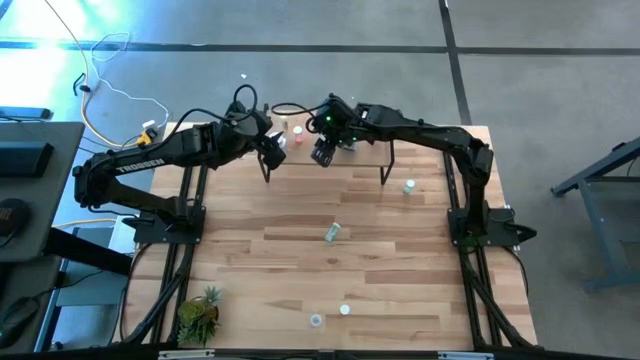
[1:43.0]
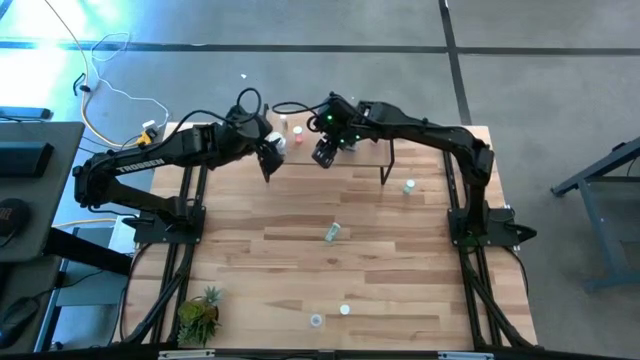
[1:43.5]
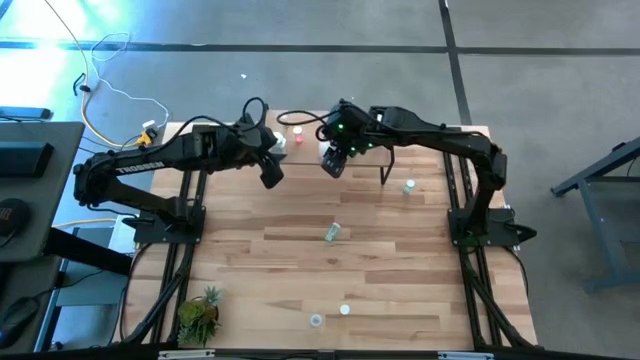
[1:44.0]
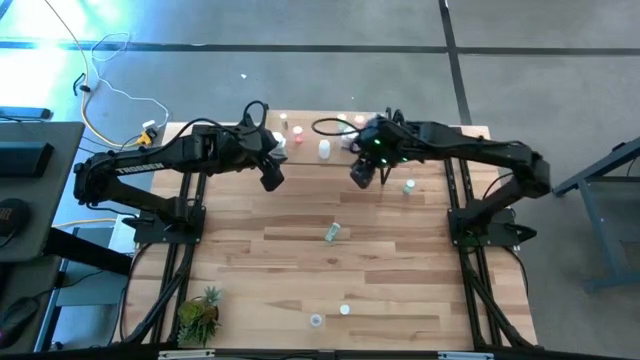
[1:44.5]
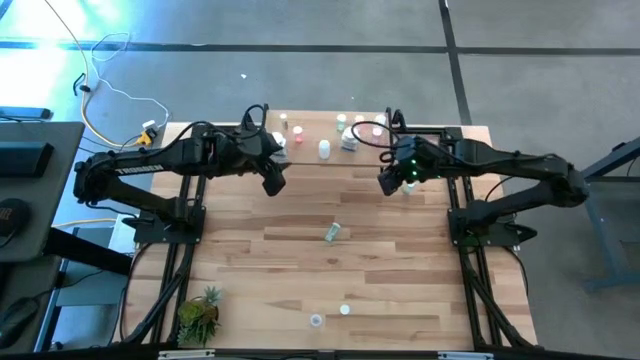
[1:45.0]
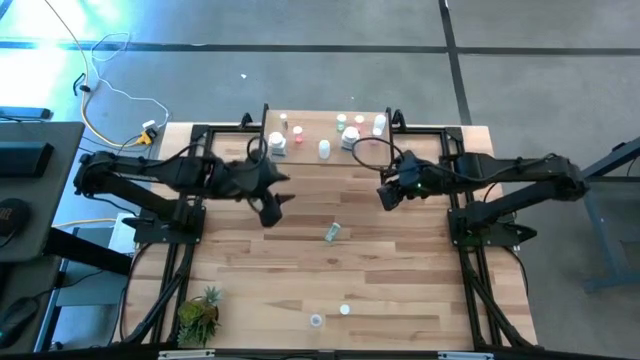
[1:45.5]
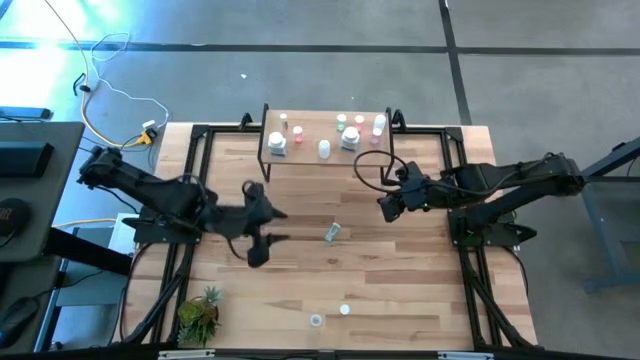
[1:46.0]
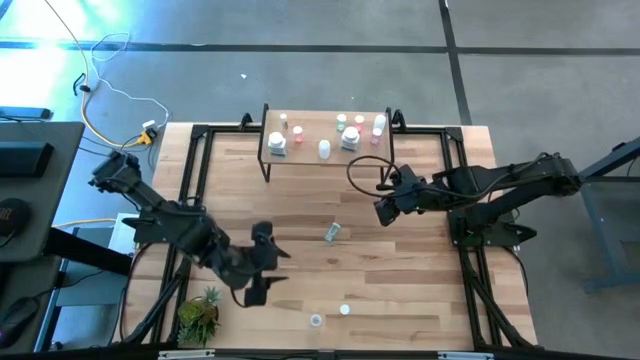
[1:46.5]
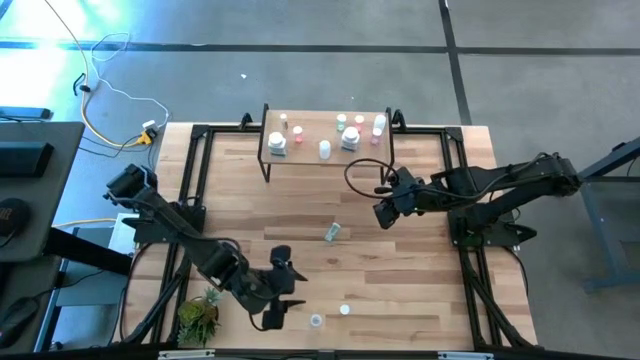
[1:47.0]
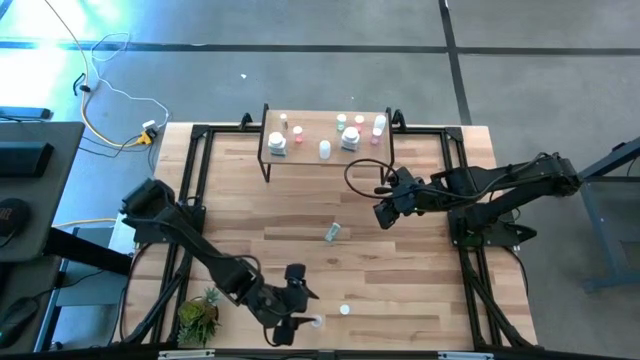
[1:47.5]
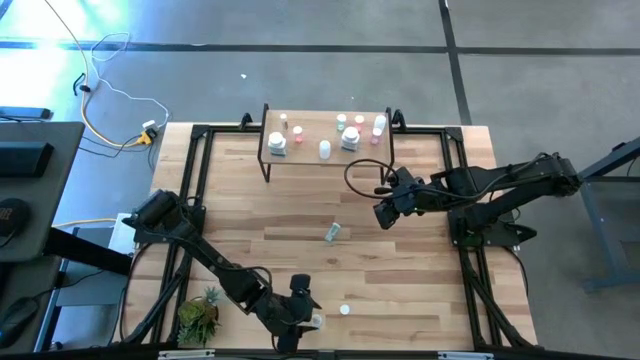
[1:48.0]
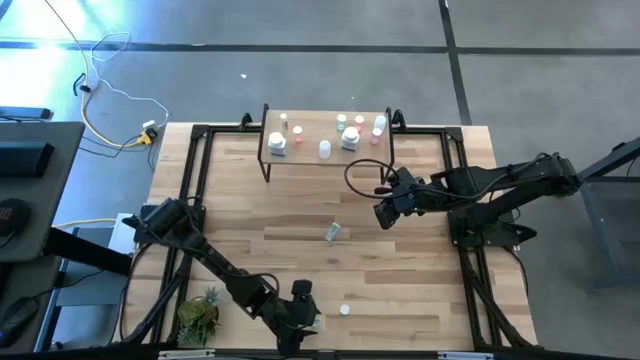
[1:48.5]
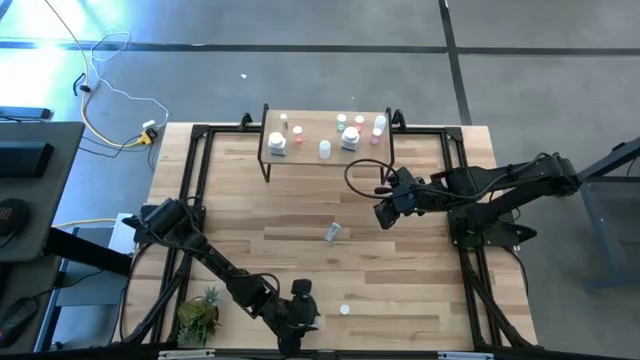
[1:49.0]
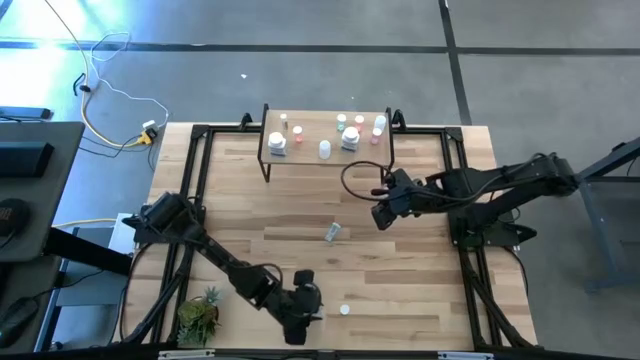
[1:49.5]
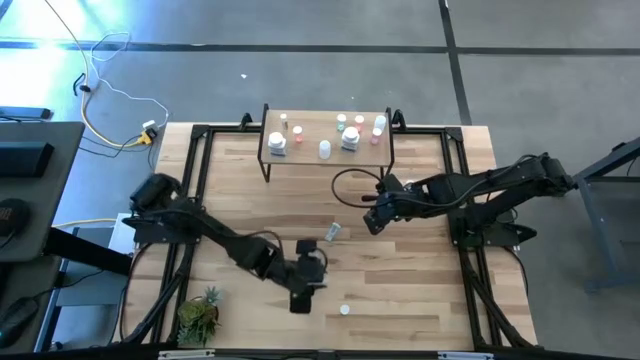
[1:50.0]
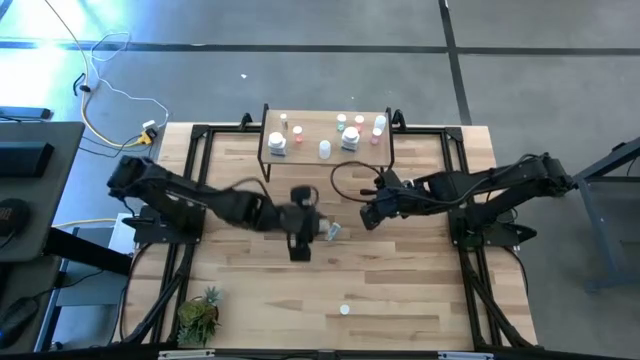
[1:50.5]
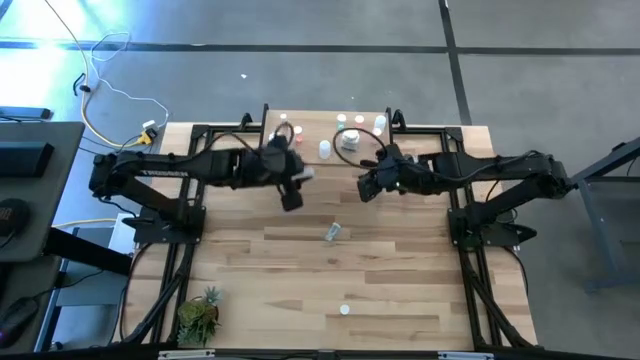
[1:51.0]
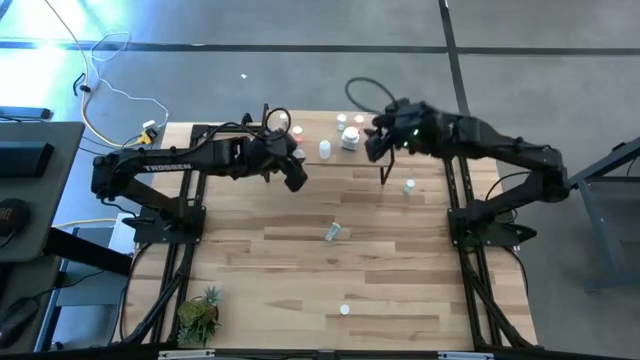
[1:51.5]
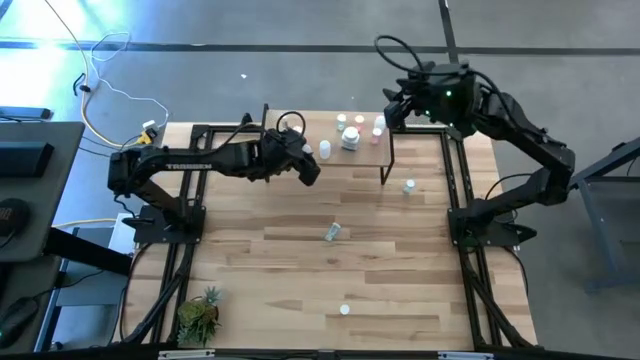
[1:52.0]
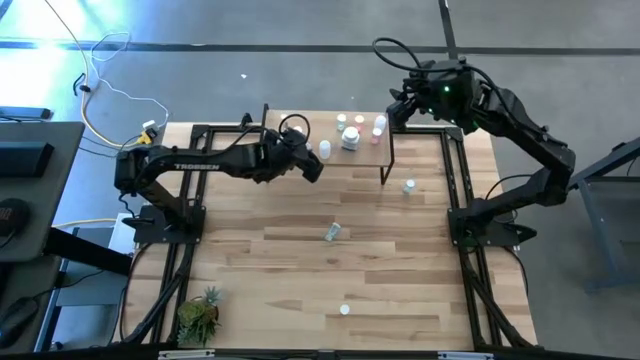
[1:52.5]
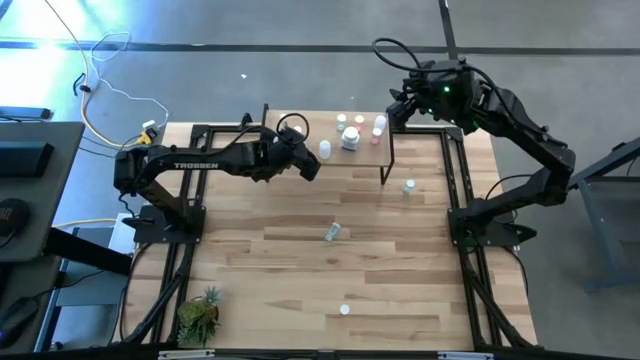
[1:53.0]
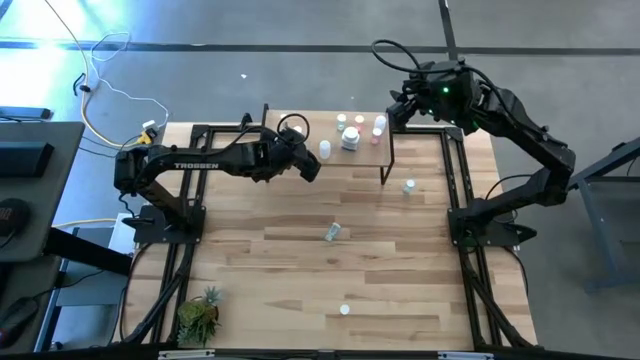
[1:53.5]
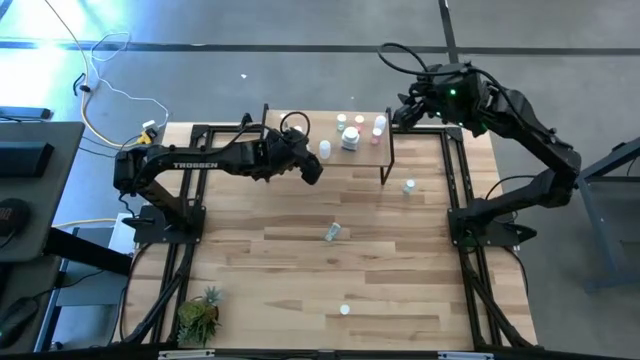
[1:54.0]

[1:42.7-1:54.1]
Task: Pick and place medicine bottles onto shelf by color
Put the bottom transparent pill bottle on the shelf

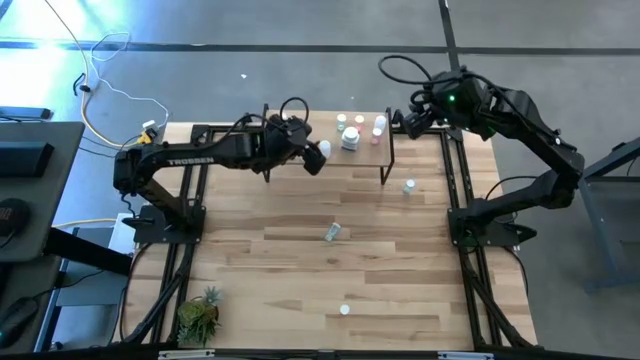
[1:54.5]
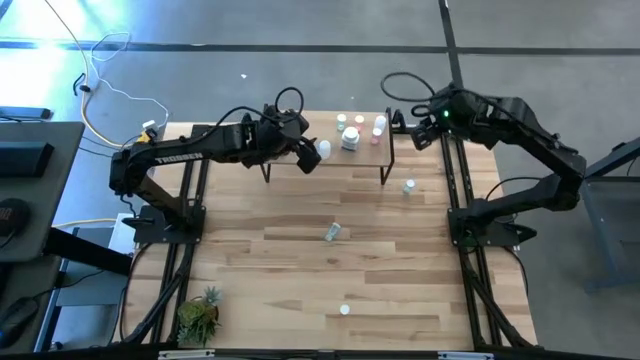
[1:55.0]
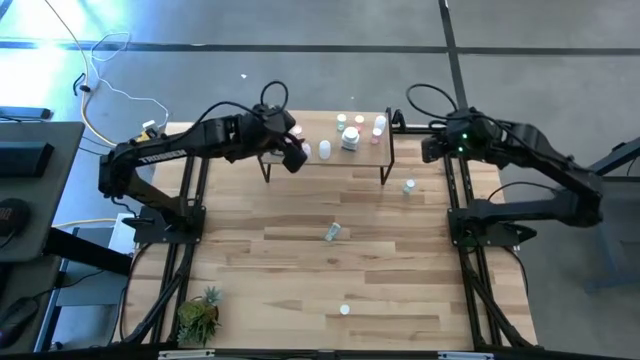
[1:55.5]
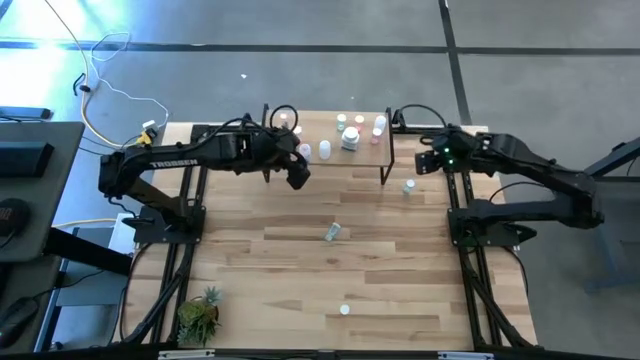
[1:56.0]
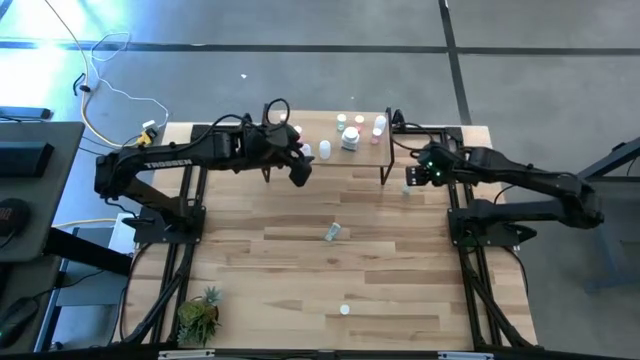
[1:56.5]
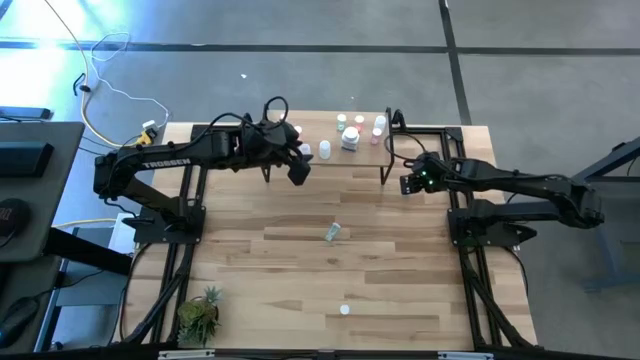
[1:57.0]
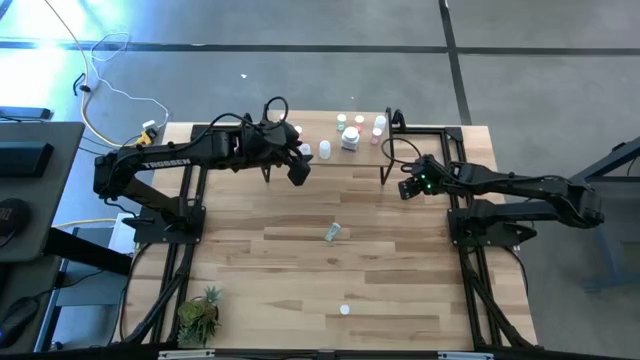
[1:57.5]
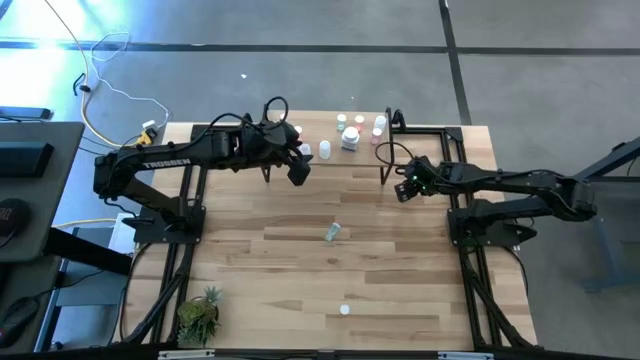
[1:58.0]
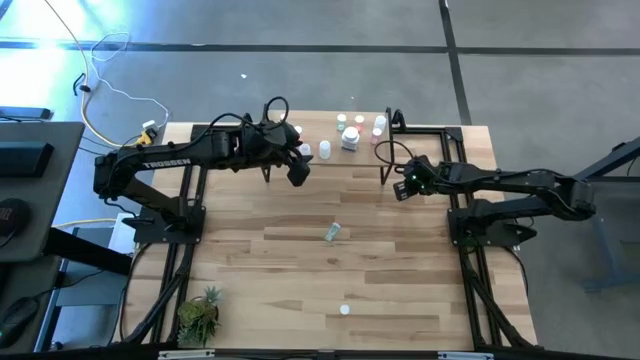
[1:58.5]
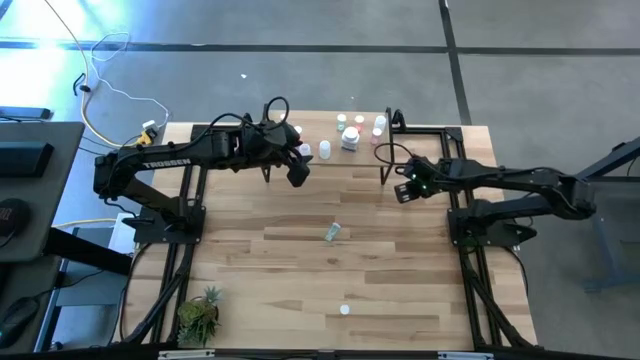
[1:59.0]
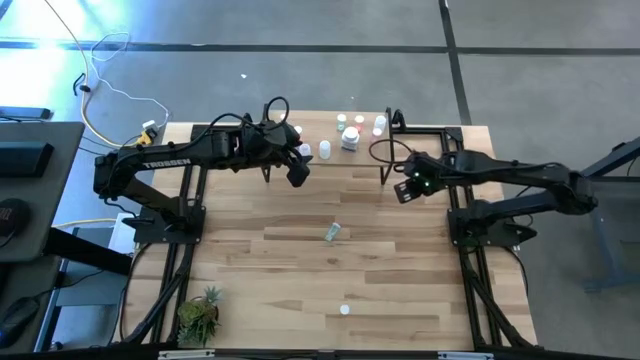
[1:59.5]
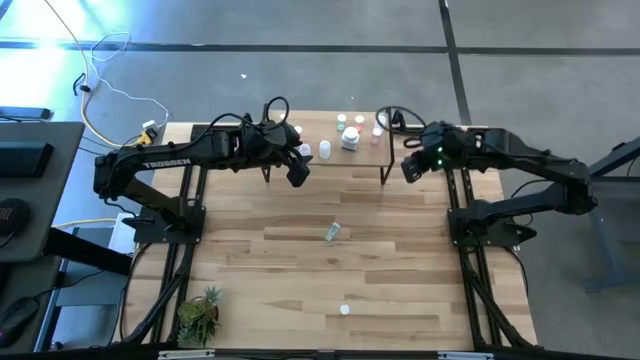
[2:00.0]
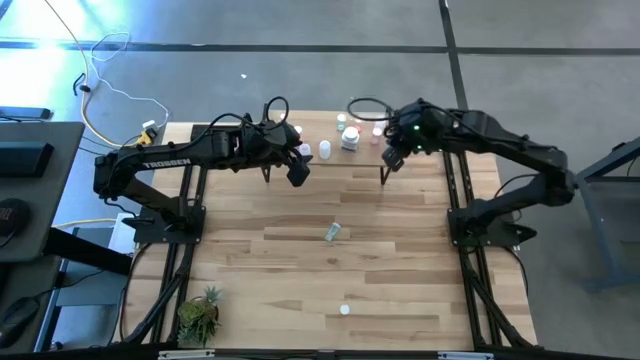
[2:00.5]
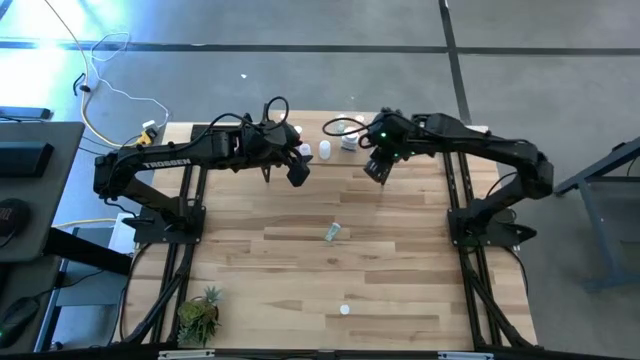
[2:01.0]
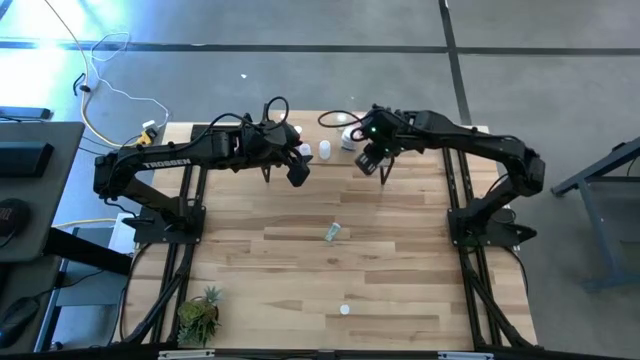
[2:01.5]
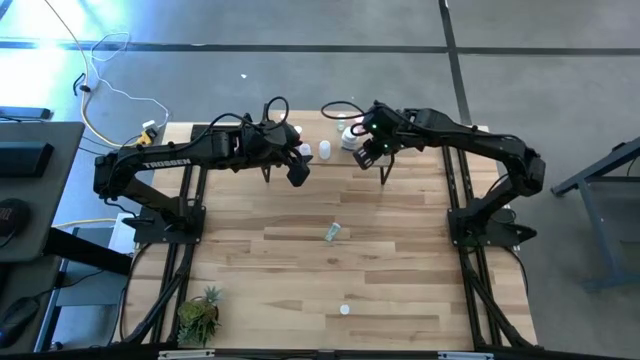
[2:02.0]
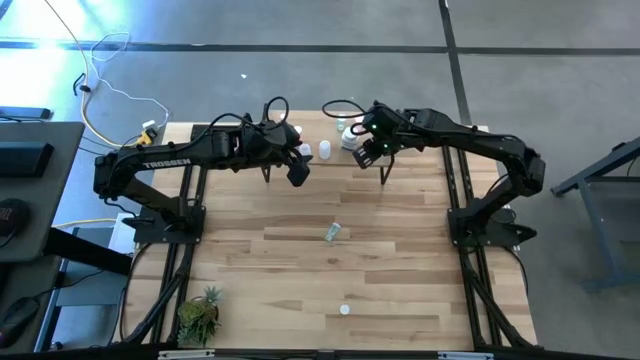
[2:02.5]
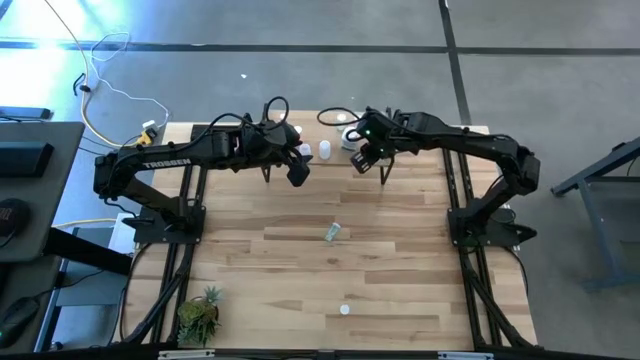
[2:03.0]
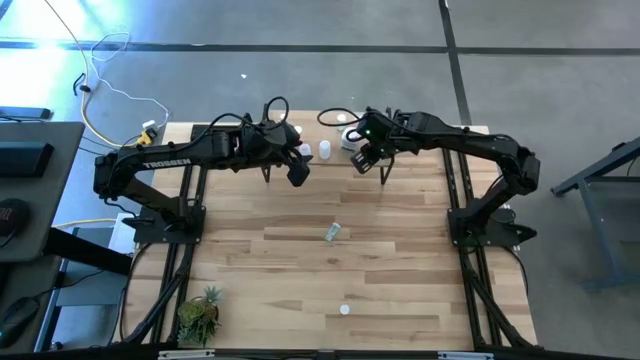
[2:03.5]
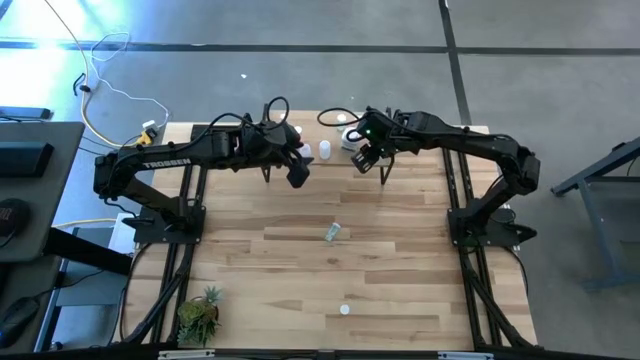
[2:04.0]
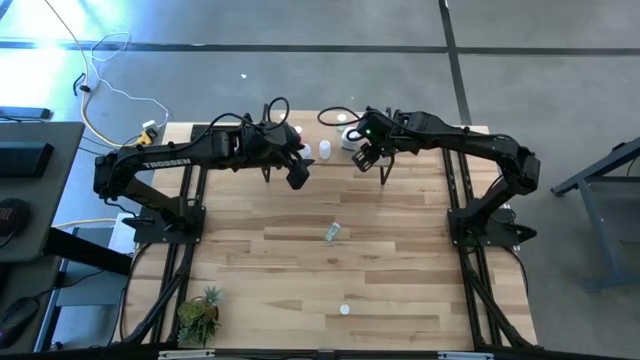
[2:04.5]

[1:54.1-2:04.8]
Put the top blue pill bottle on the shelf
